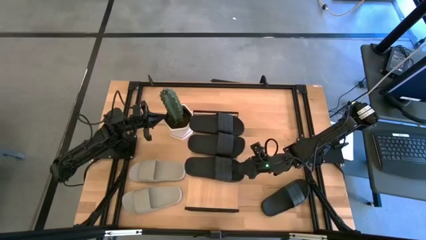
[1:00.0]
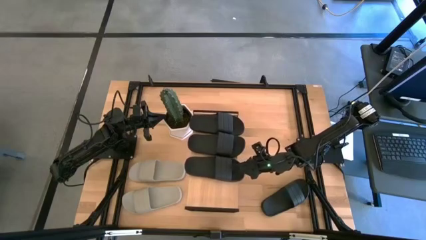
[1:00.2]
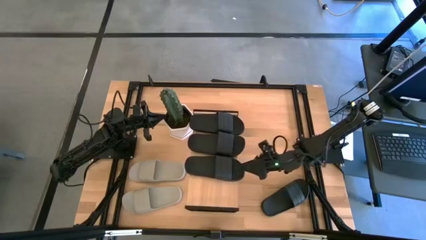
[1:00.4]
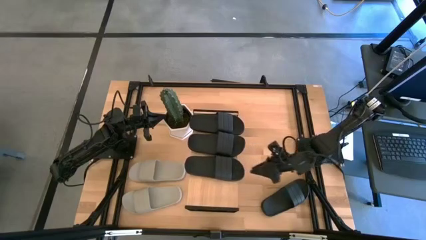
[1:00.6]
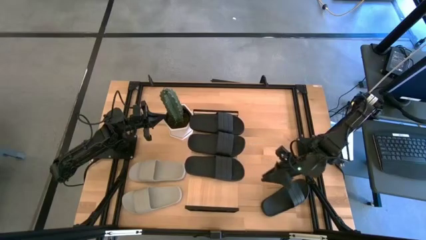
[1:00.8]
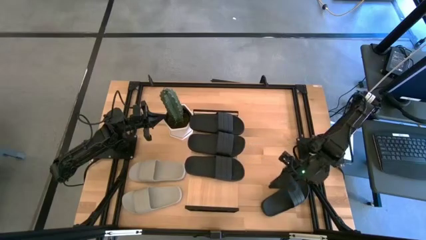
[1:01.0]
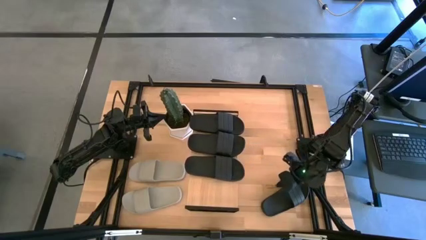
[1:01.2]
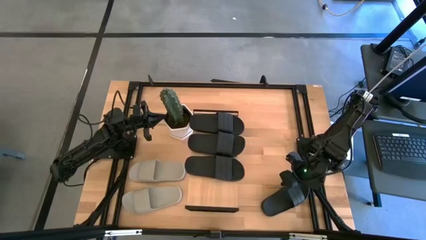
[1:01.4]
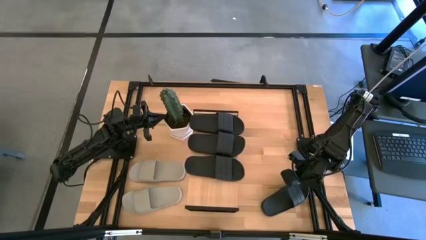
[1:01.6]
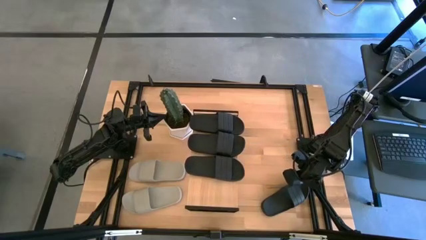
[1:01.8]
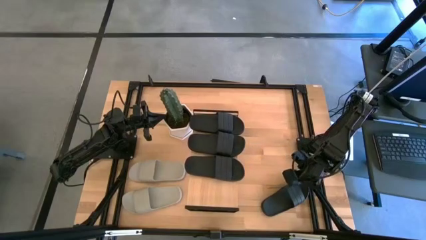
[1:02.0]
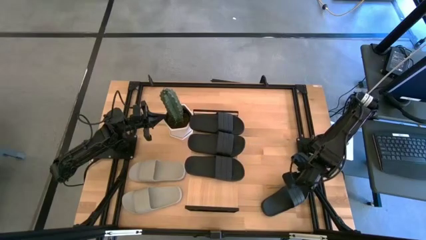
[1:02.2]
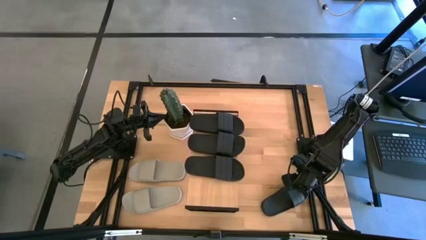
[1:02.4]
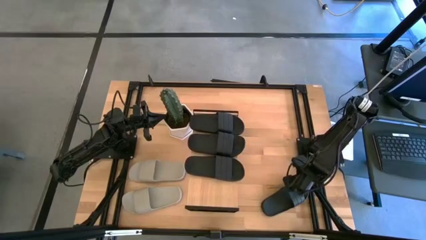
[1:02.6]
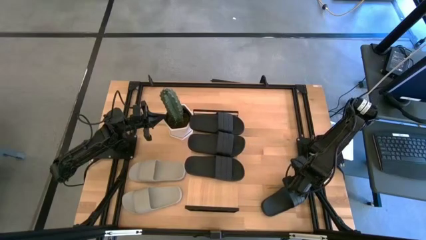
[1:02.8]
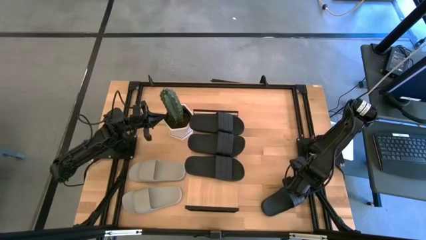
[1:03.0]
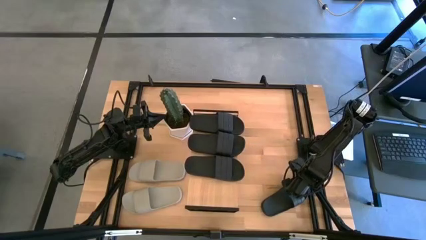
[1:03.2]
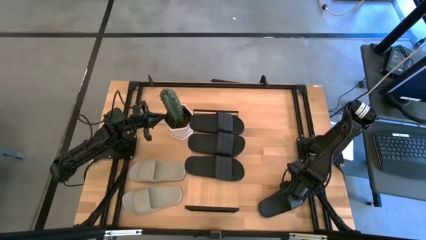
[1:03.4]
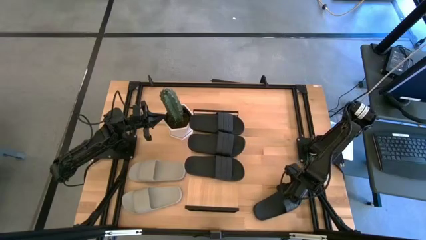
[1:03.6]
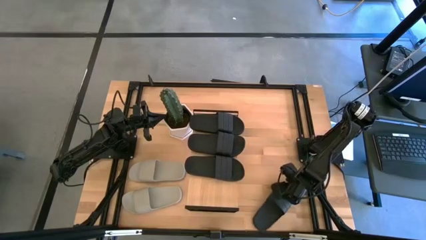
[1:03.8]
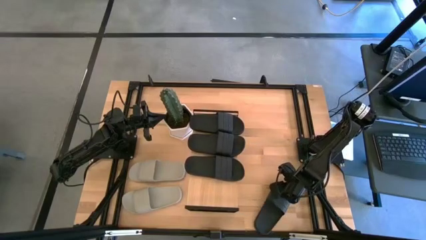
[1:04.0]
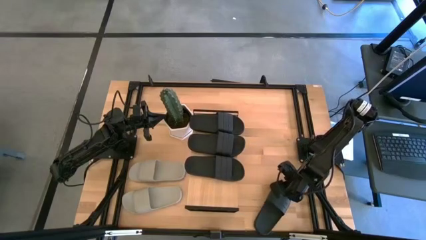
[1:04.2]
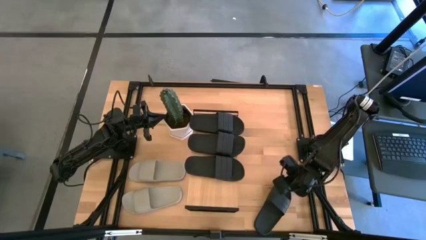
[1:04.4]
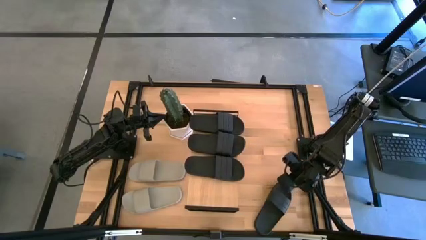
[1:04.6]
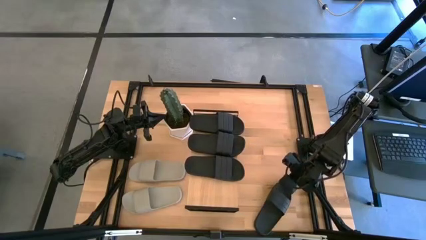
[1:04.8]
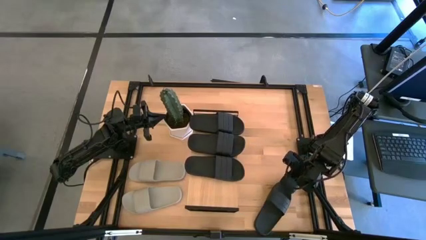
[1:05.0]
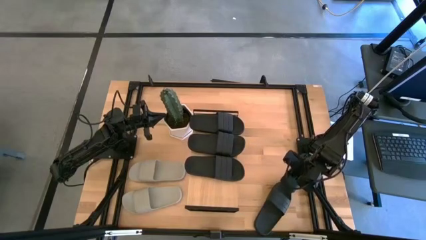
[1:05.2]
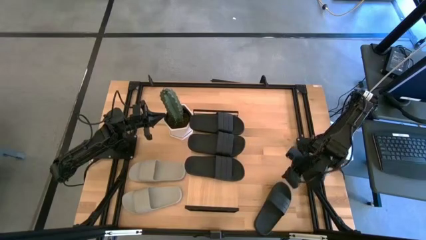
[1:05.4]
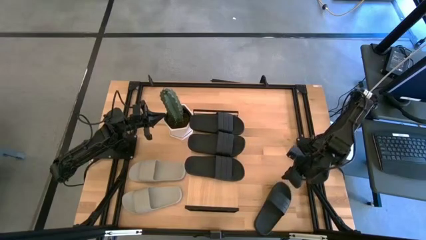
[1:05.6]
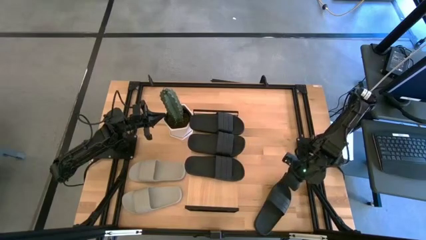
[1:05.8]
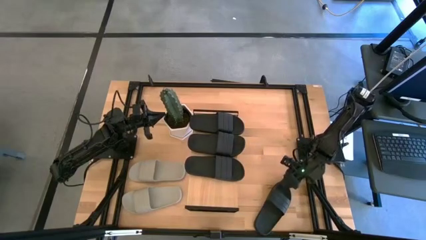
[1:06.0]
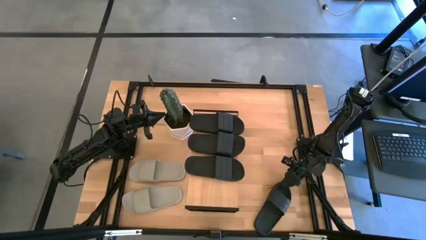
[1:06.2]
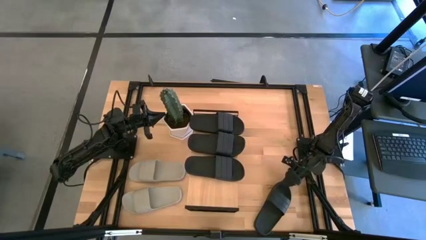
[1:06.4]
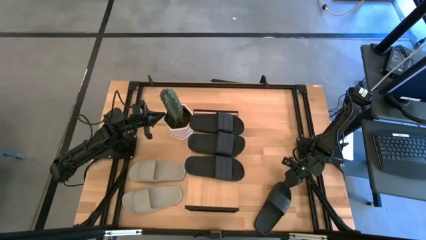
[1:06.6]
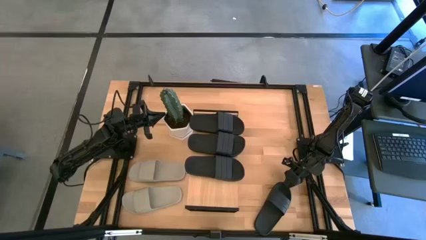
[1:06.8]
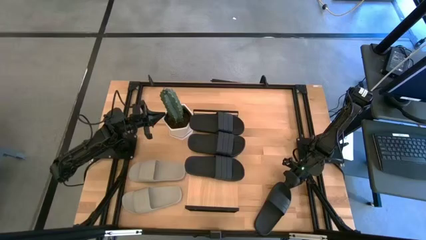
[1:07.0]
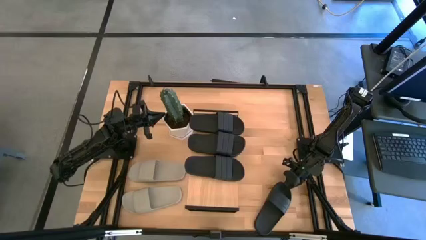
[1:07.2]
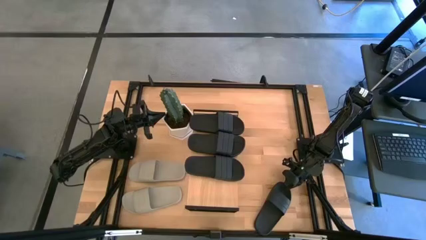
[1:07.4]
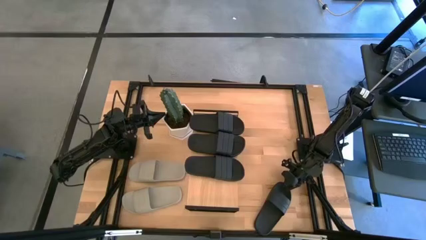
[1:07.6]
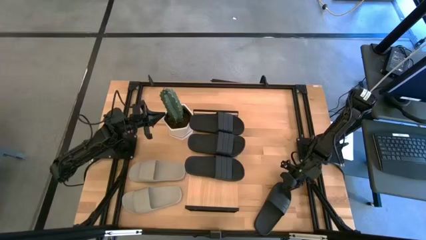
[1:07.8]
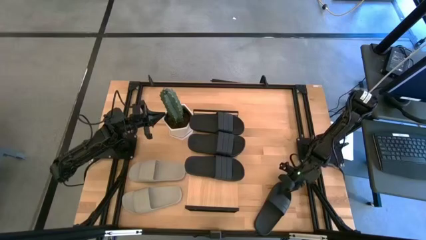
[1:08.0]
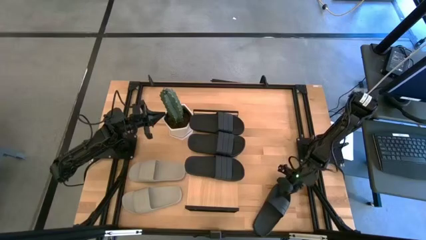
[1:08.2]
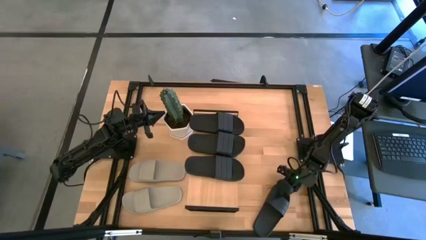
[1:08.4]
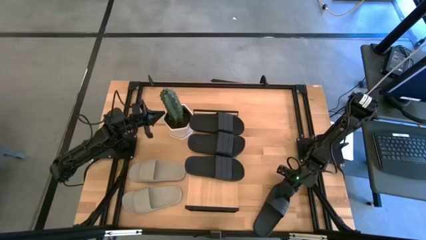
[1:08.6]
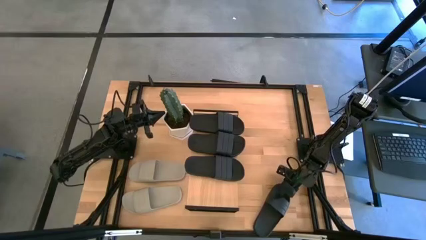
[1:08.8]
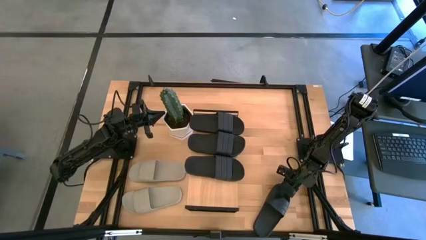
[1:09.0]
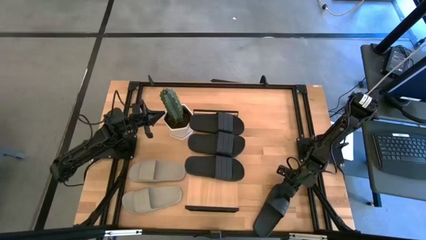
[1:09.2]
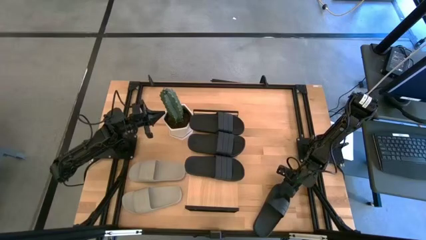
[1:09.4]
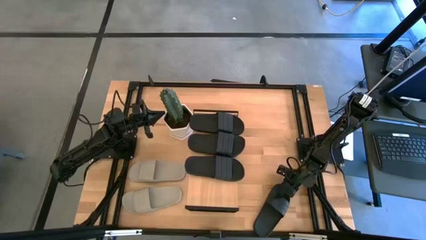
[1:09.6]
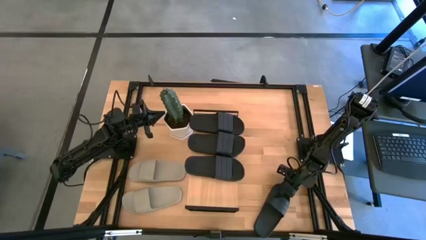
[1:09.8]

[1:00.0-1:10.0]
Task: Pick and place slides into the shelf
Put the black slide on the shelf

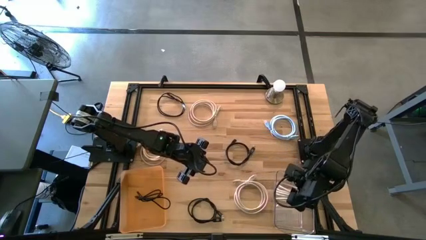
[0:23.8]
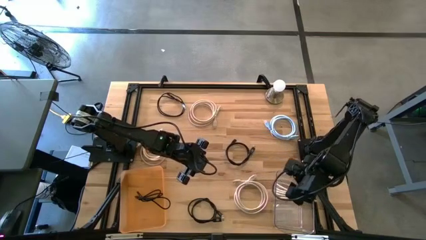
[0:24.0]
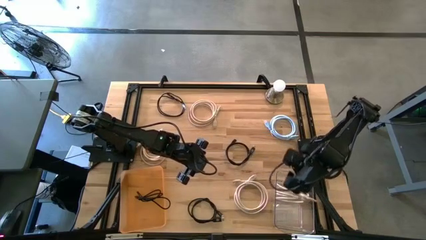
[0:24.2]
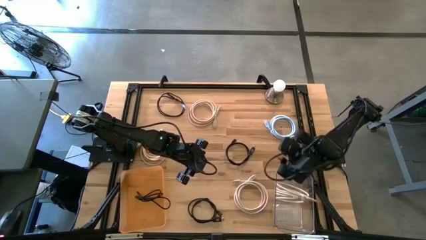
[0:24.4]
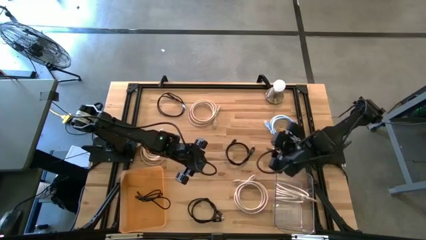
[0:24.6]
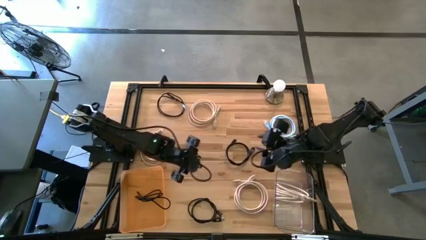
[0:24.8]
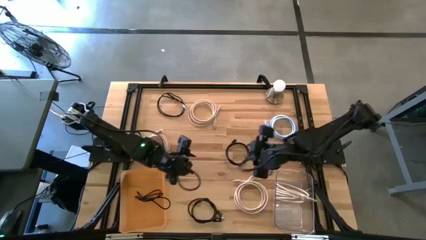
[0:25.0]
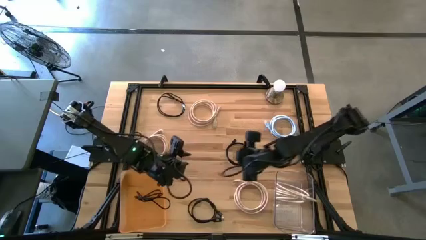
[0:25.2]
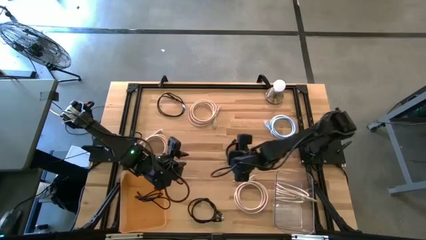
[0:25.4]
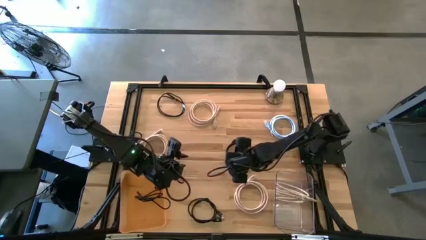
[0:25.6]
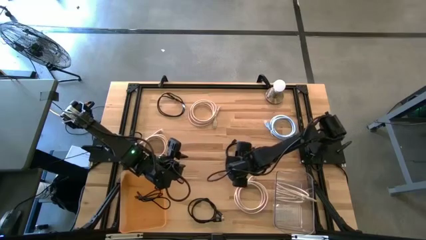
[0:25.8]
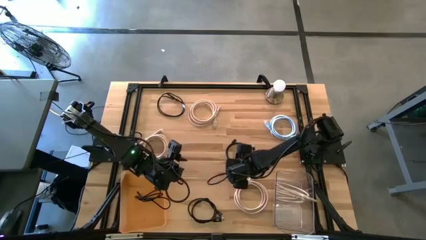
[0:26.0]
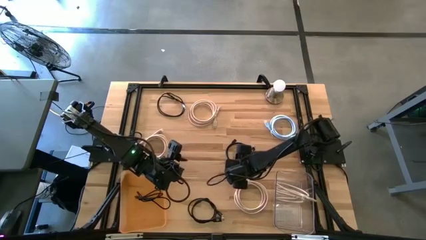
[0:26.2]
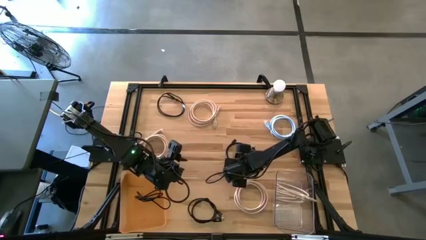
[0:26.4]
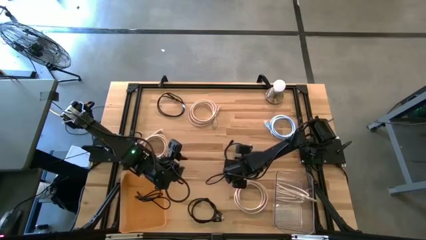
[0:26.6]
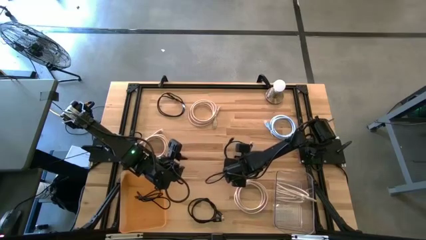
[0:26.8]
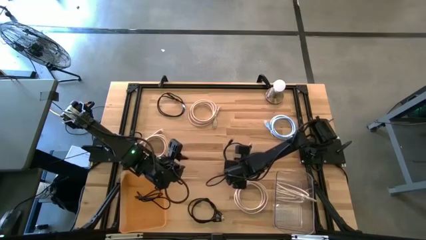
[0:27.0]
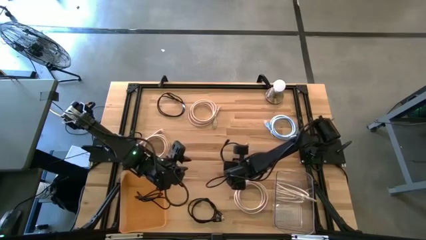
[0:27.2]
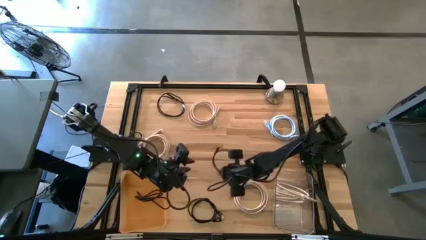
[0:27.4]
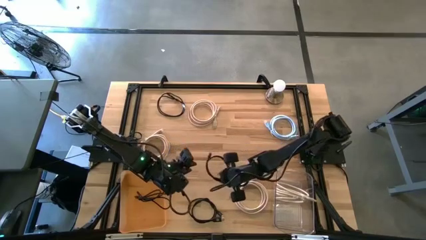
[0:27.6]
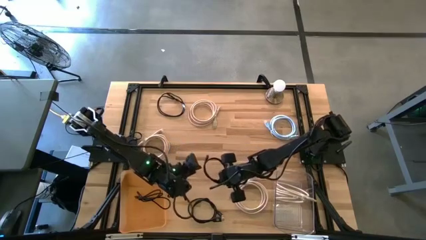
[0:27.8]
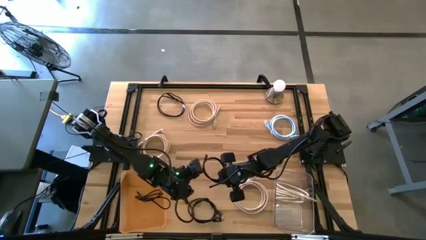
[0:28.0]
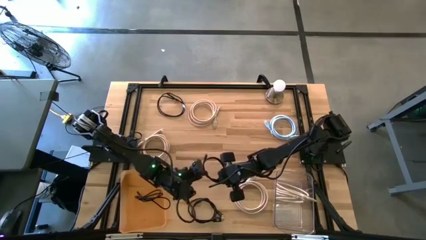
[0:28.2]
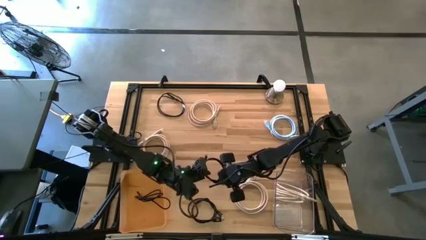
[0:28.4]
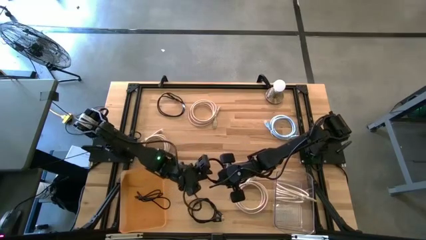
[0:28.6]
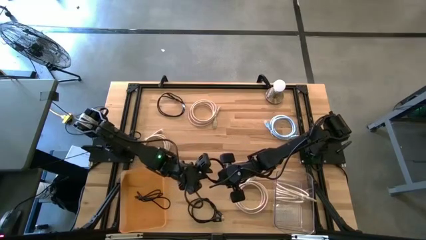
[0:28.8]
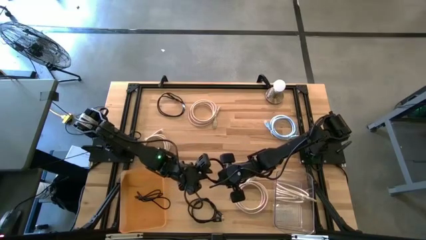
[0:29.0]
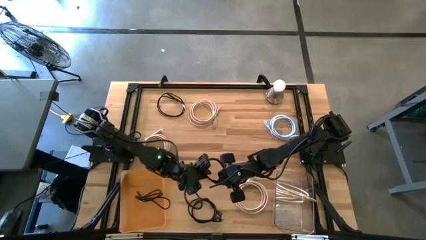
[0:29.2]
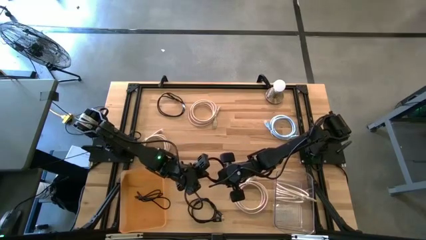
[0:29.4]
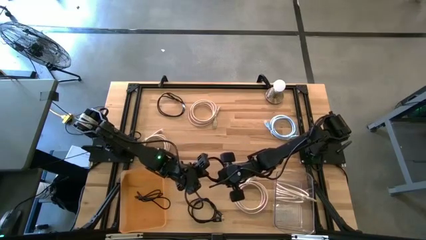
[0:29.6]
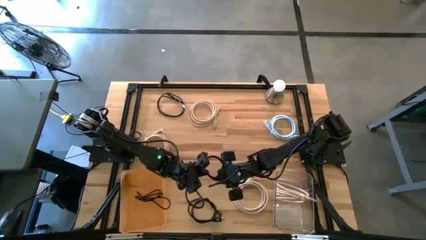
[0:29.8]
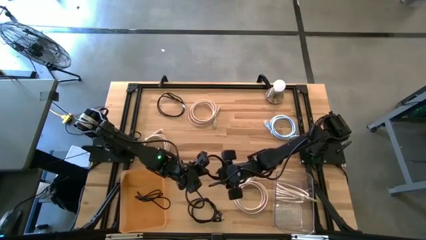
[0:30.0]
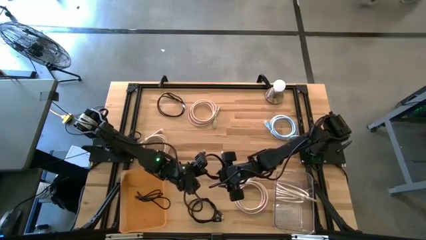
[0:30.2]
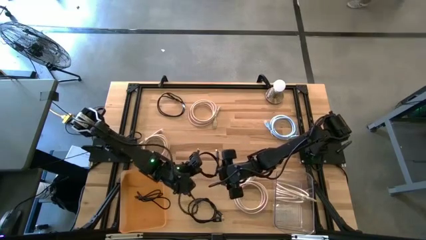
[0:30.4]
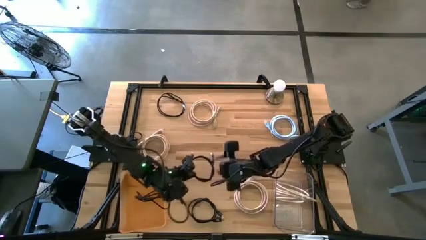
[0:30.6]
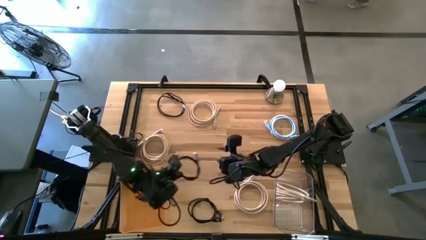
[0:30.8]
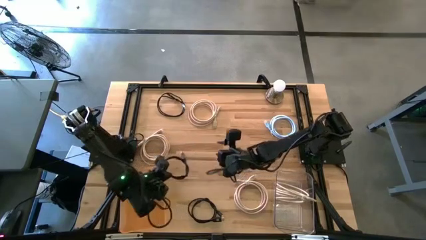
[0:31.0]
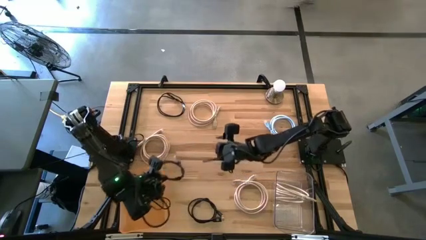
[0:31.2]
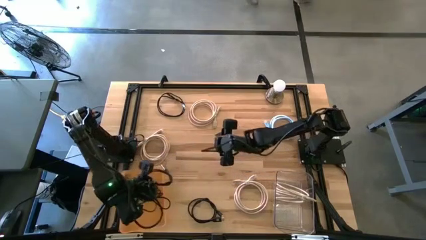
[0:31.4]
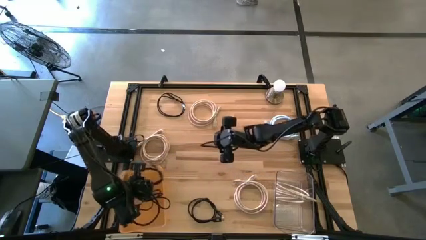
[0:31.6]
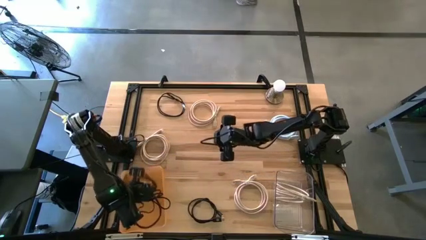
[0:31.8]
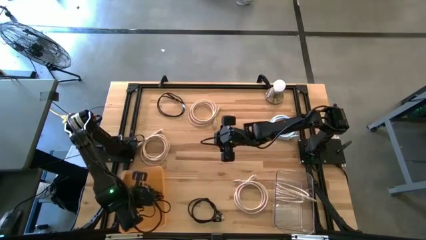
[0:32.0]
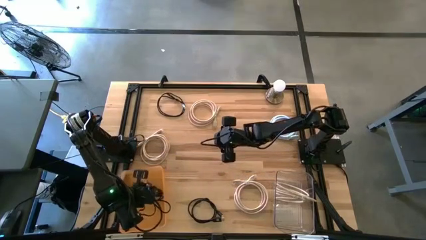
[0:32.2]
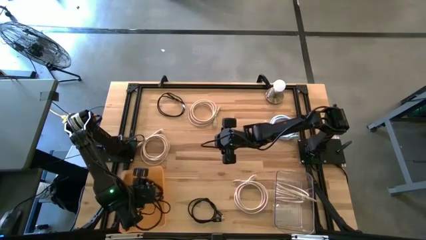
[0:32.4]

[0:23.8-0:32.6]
Task: Sort HDMI cables
Put the black HDMI cable into the orange bin
